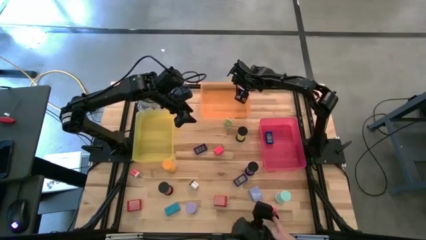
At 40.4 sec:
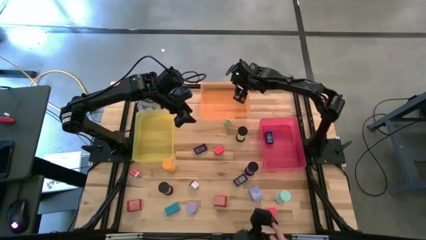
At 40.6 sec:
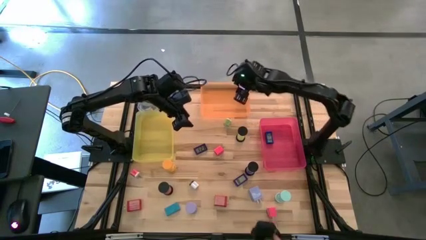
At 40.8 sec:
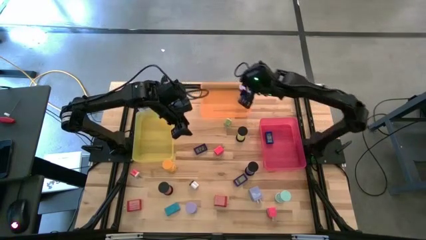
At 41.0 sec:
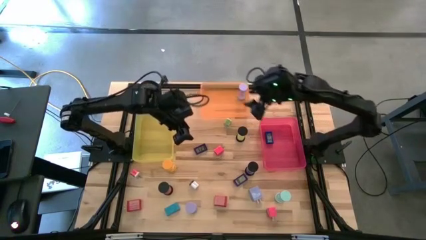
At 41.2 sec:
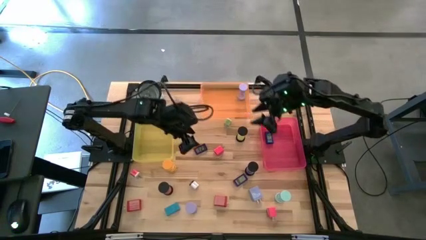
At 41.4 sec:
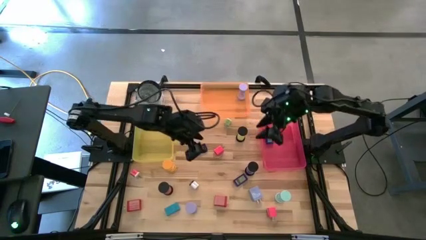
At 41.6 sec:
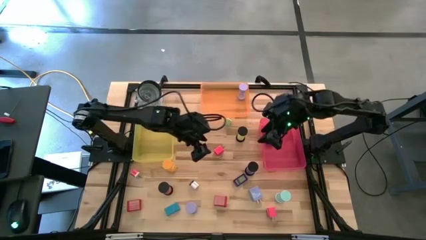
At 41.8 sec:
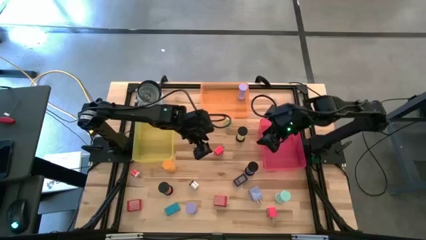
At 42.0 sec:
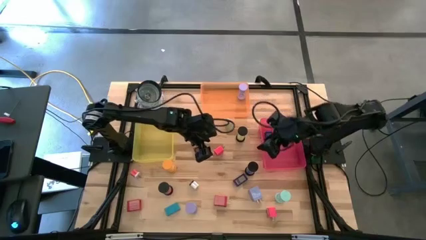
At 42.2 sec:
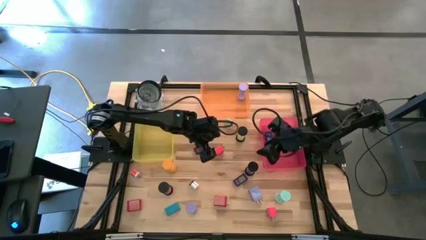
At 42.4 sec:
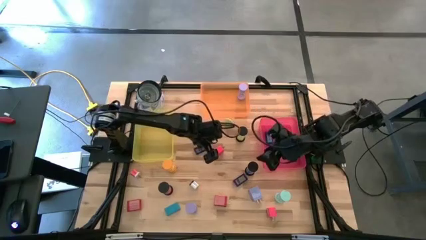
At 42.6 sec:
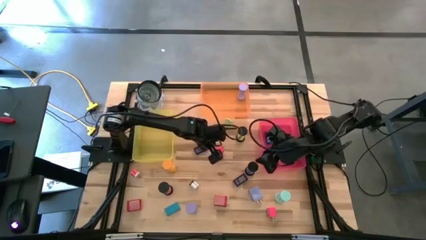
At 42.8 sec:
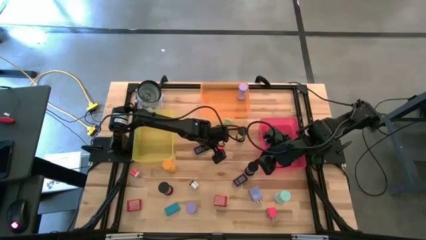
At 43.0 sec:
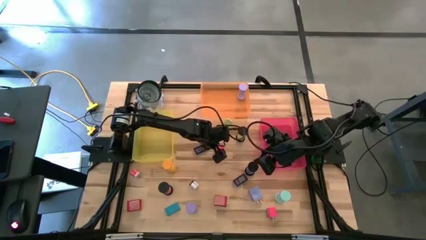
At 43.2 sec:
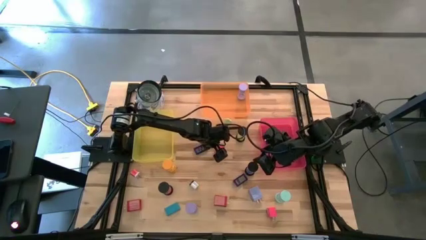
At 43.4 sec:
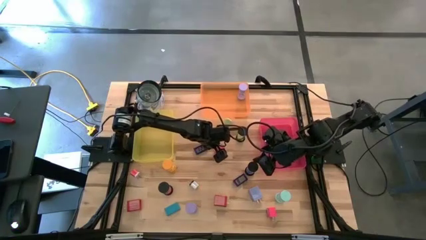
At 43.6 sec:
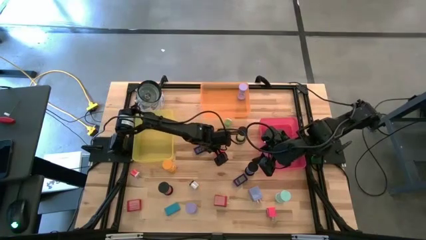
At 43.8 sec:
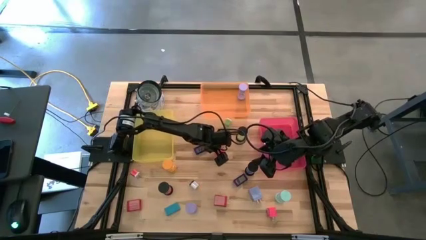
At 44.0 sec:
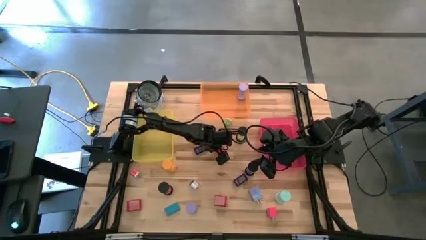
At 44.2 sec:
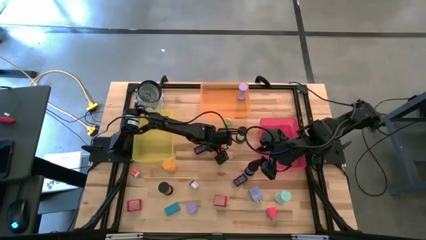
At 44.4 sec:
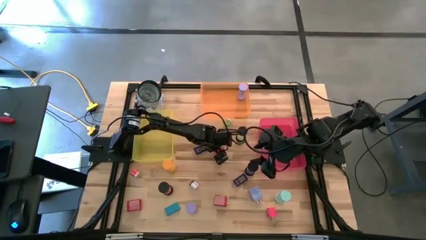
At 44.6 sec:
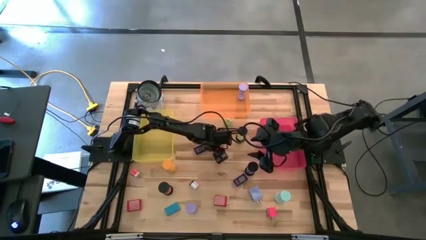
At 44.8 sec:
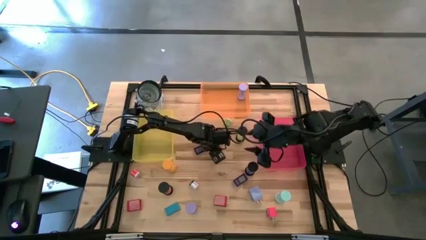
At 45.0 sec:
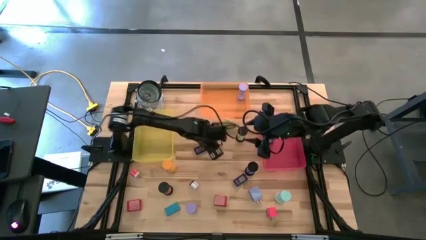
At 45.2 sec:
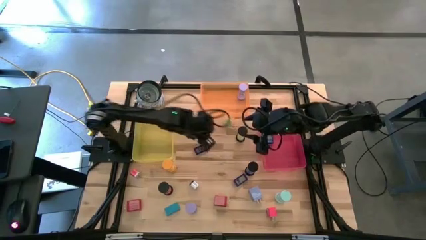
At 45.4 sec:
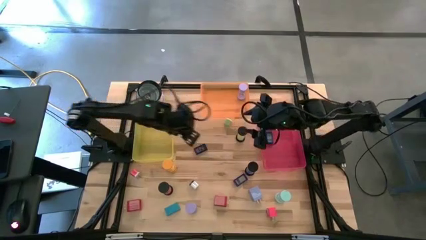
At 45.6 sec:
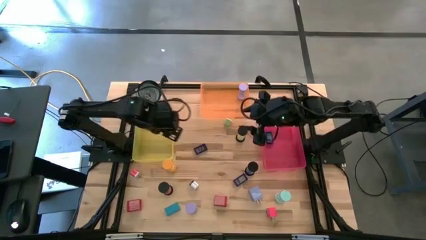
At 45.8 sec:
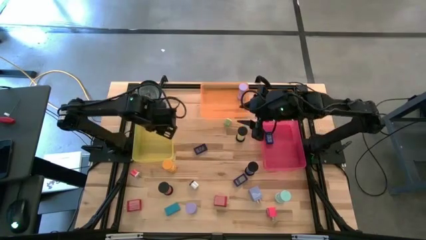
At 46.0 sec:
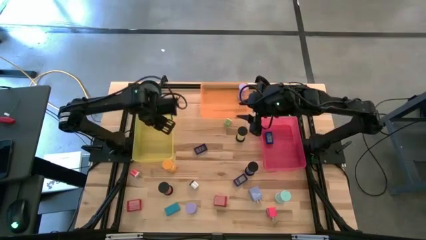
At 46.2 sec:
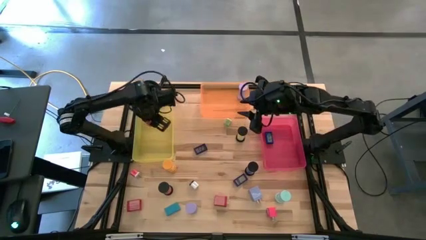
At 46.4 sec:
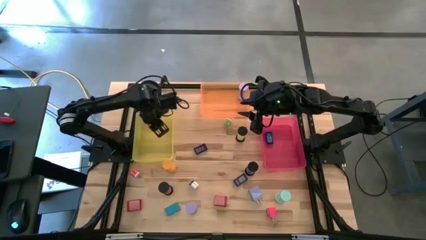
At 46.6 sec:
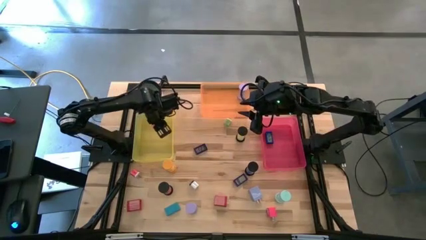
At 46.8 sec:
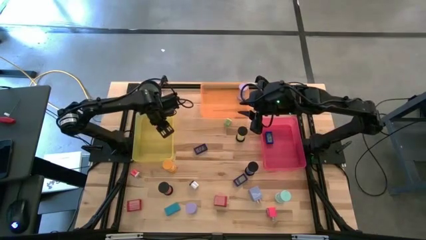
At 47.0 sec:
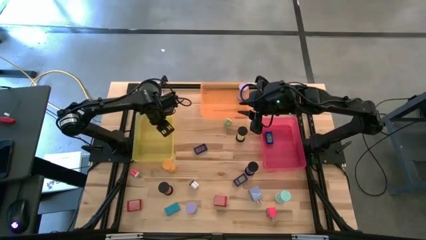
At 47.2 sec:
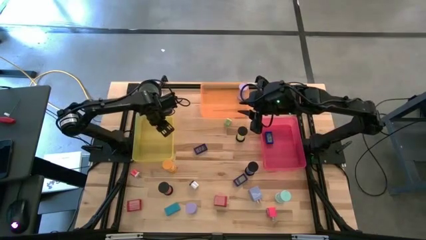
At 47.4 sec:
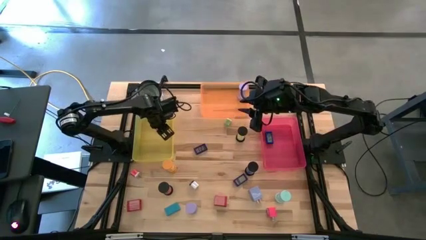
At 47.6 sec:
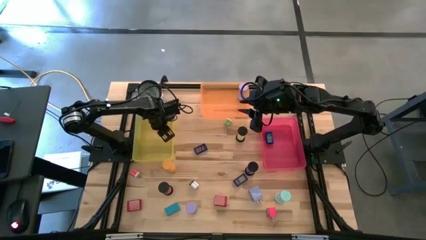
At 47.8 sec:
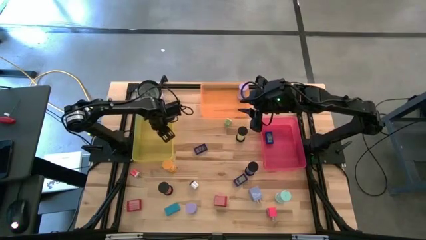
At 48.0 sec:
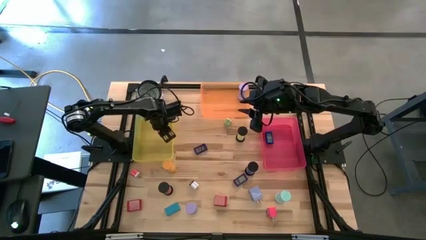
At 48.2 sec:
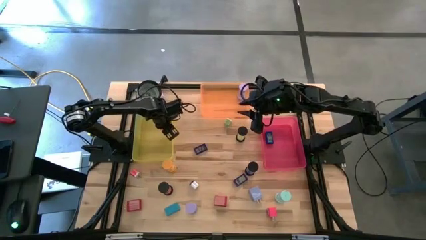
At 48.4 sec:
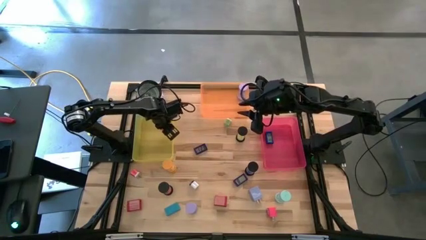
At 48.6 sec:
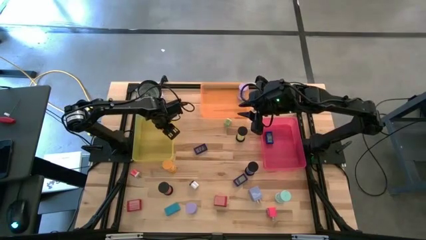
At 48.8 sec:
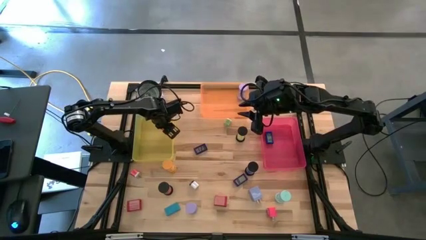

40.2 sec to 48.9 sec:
Task: Pick & Place Office items
Put the red charger in the orange bin

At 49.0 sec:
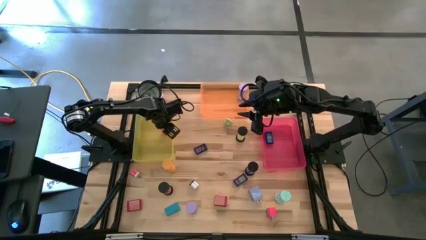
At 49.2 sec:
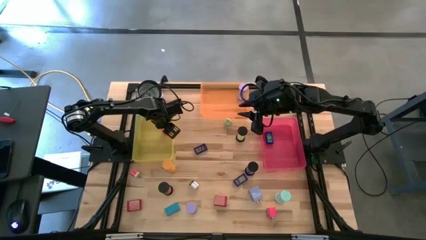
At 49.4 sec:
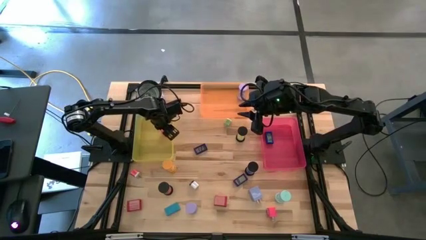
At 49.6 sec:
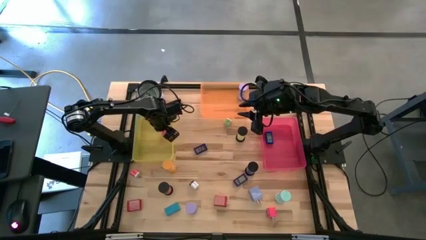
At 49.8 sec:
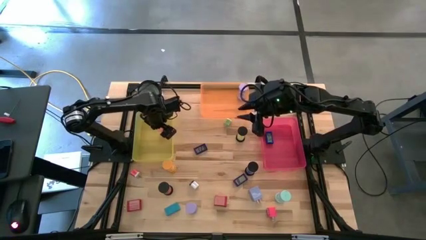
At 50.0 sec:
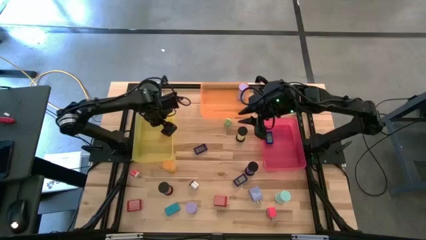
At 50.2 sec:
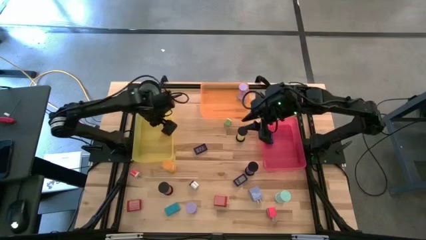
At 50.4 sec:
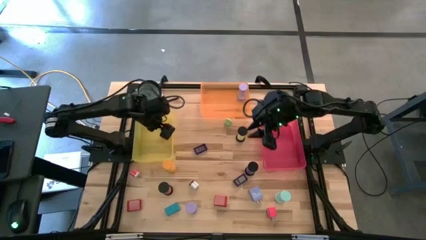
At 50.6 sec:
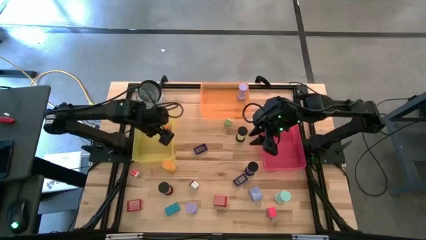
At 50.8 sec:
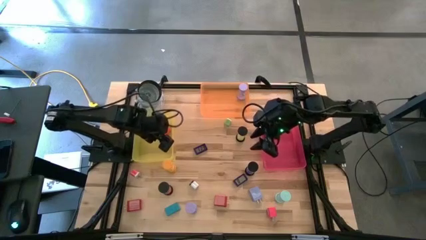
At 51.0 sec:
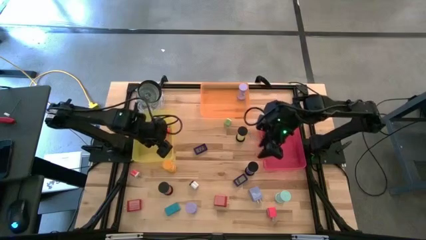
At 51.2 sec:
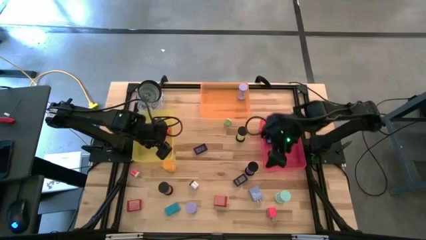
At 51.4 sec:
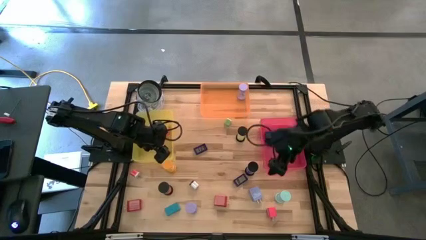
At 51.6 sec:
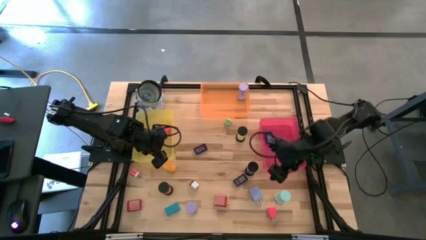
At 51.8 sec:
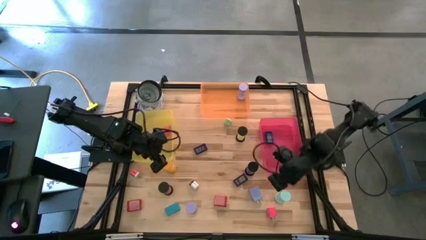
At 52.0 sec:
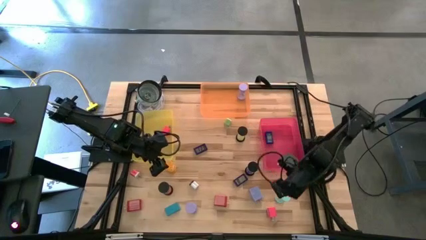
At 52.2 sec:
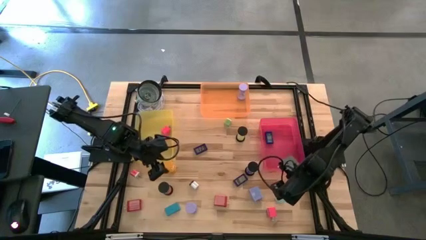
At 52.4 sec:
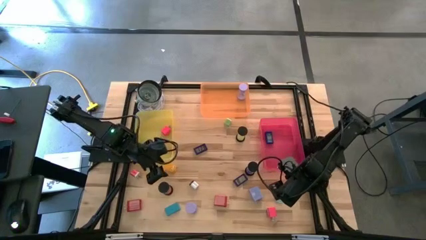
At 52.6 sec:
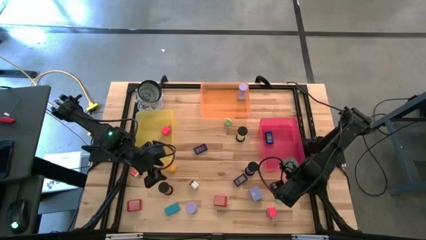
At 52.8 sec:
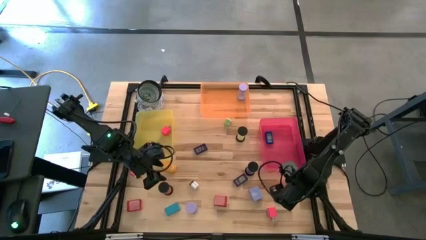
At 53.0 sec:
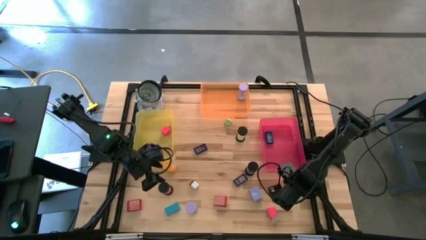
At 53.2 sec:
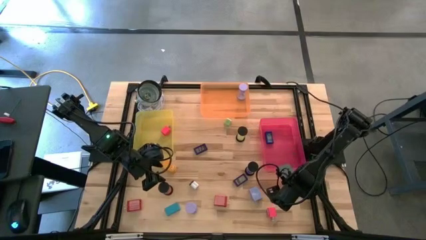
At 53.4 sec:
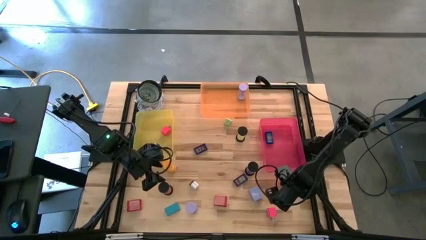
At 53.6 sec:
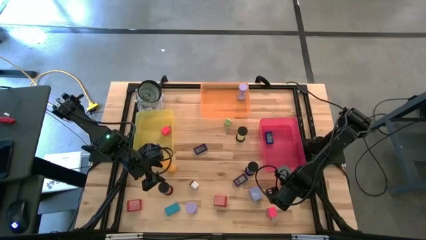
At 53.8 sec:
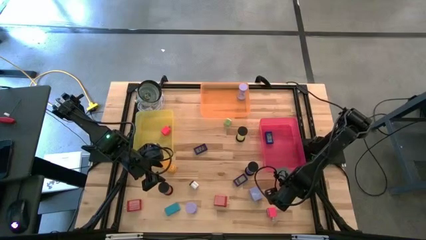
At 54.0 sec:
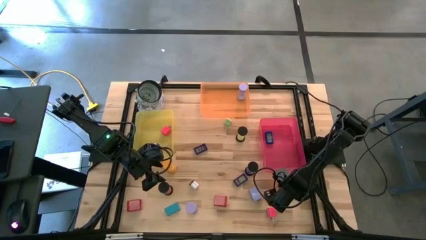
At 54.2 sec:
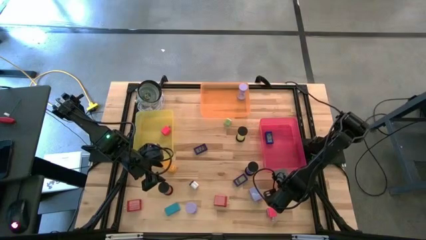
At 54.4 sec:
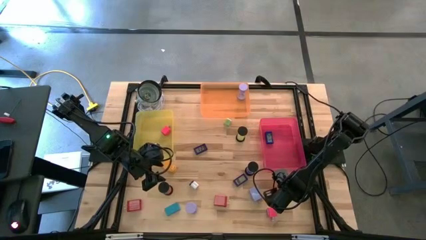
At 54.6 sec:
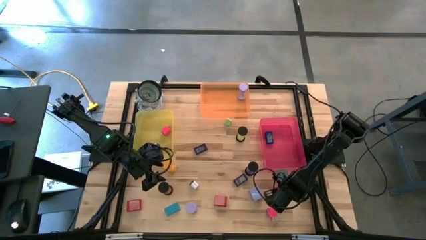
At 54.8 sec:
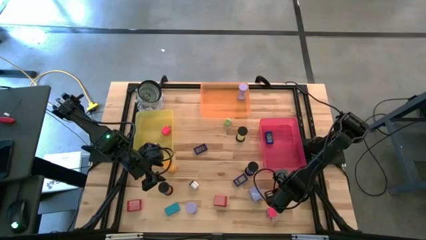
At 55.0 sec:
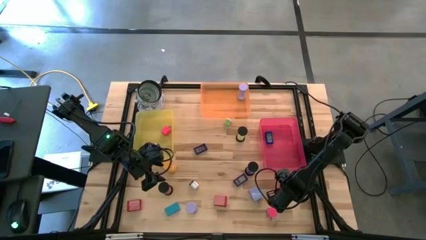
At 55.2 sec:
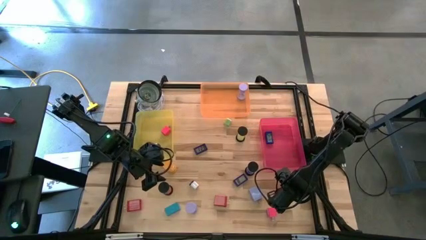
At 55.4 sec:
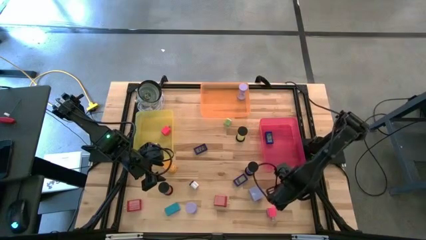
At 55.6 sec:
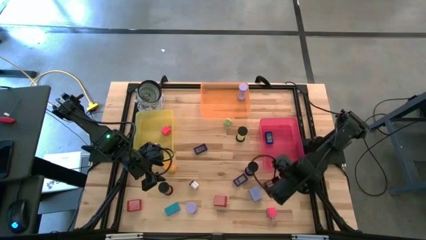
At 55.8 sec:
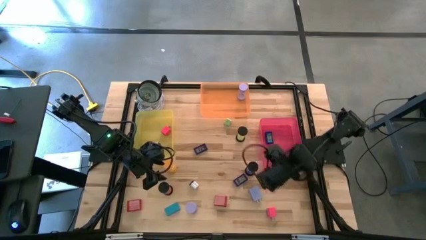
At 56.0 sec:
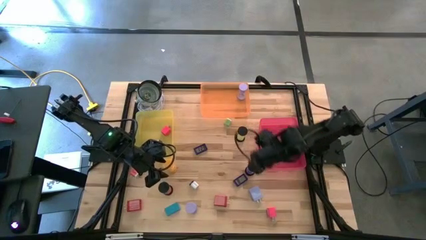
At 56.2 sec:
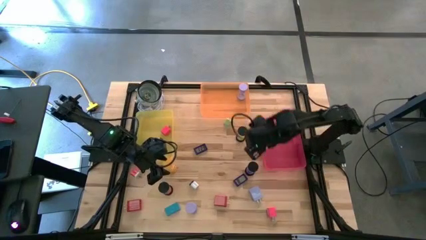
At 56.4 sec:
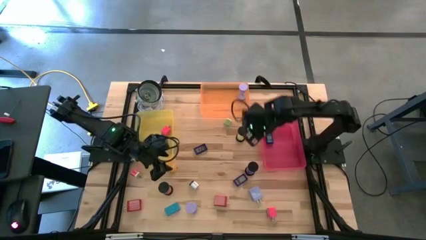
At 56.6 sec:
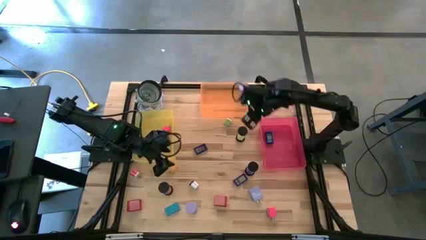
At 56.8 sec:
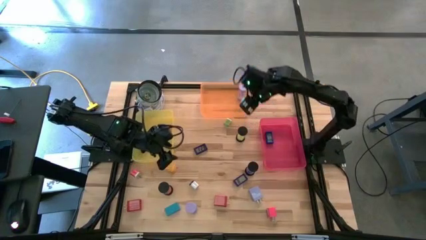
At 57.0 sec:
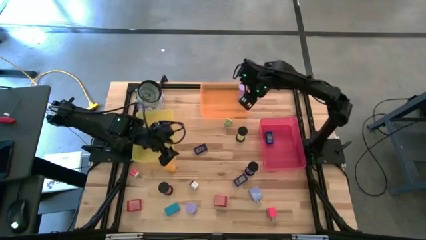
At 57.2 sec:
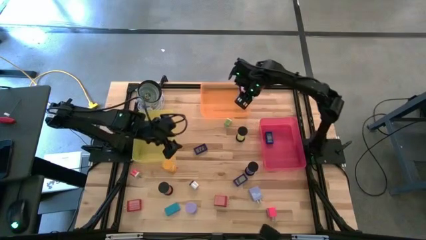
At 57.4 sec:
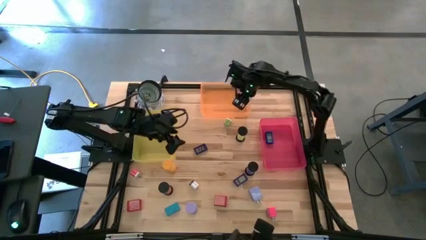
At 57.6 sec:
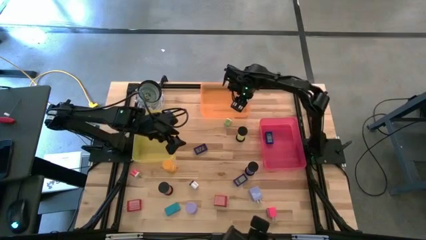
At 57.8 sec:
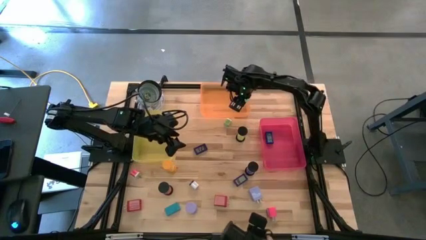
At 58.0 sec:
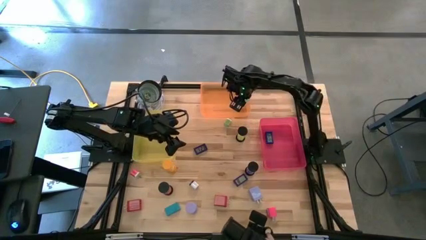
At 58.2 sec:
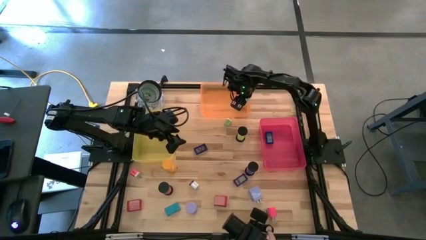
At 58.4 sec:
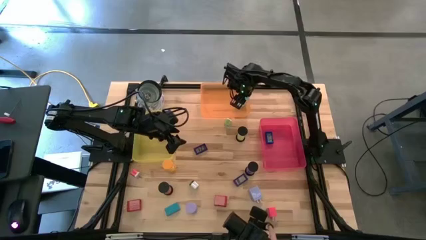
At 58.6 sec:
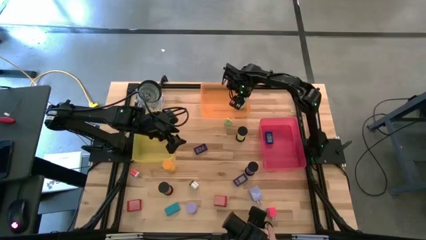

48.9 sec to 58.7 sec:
Put the blue hourglass in the orange bin
